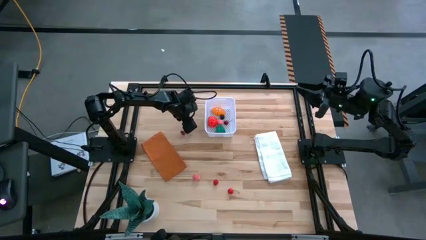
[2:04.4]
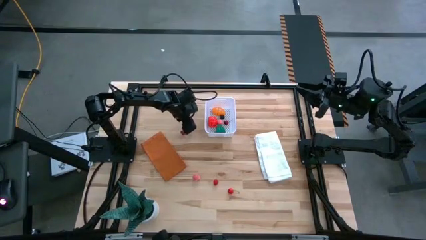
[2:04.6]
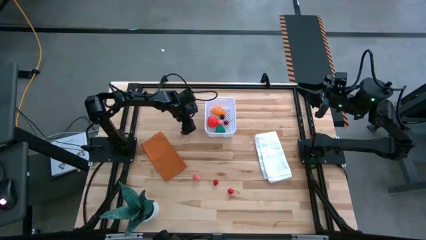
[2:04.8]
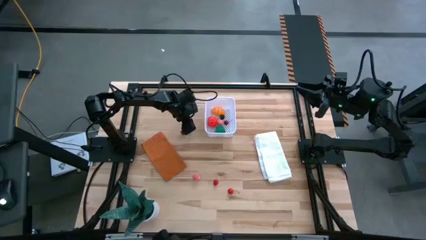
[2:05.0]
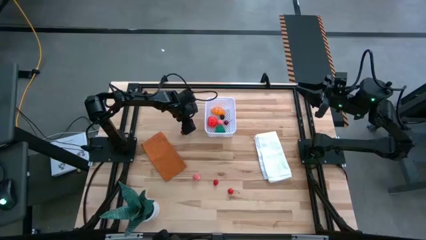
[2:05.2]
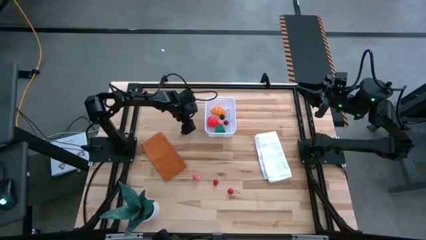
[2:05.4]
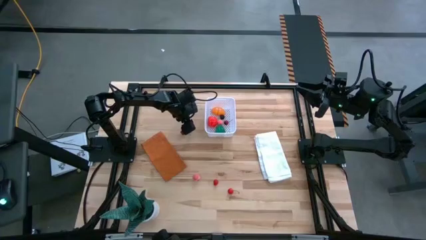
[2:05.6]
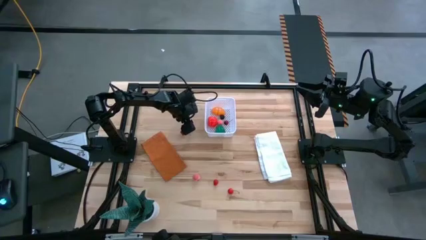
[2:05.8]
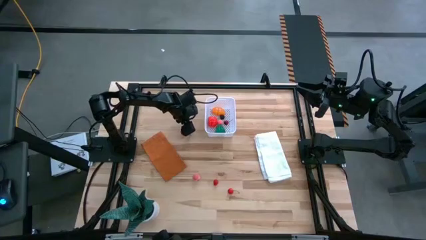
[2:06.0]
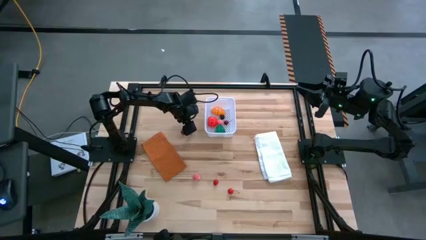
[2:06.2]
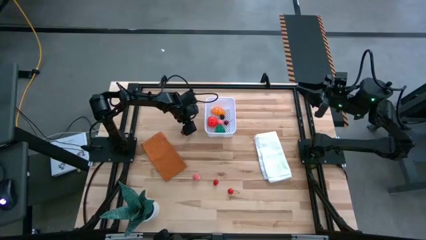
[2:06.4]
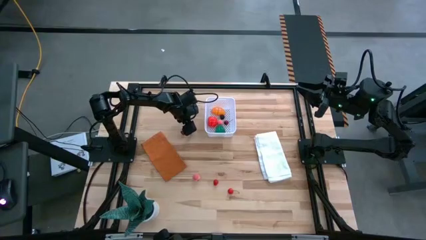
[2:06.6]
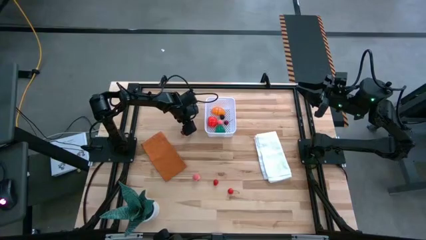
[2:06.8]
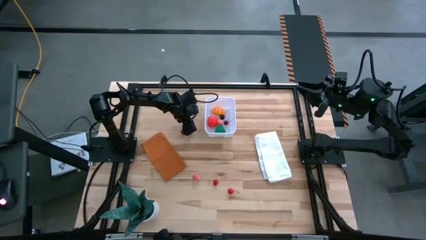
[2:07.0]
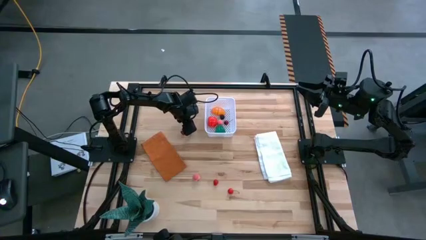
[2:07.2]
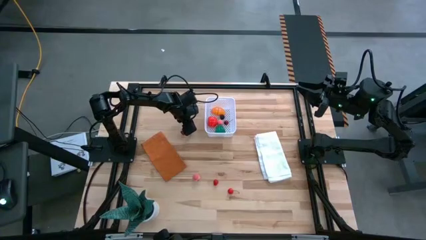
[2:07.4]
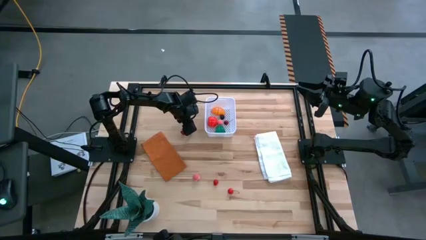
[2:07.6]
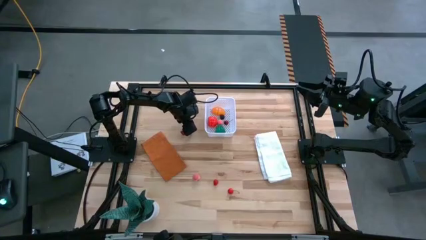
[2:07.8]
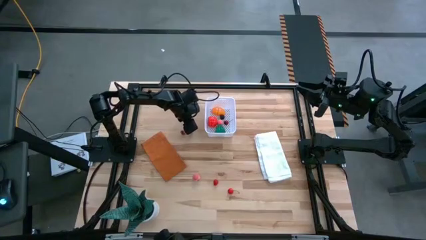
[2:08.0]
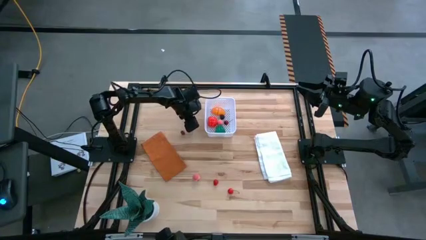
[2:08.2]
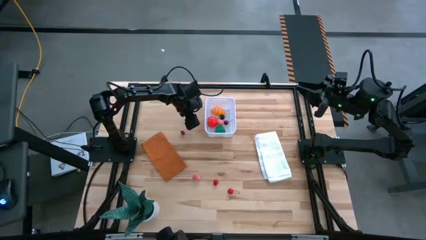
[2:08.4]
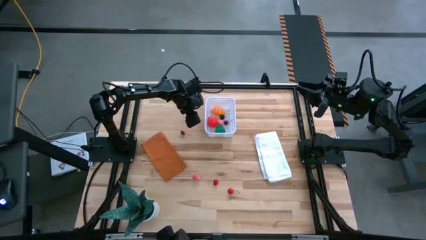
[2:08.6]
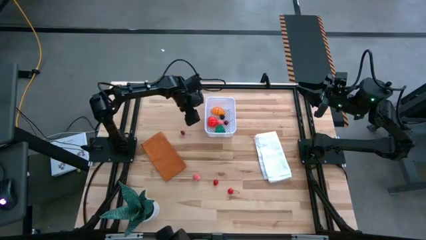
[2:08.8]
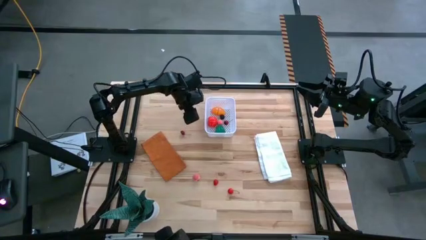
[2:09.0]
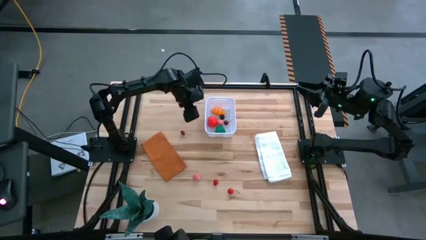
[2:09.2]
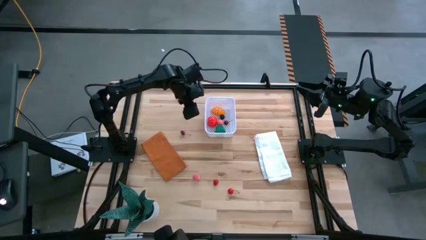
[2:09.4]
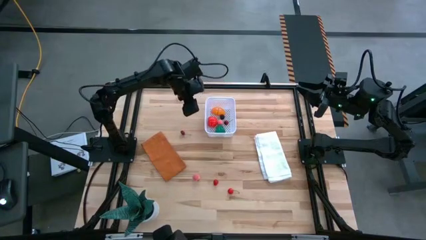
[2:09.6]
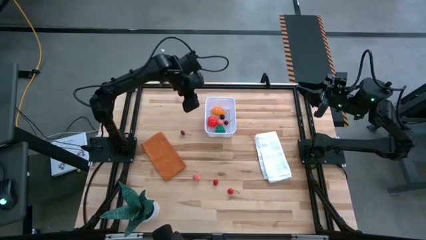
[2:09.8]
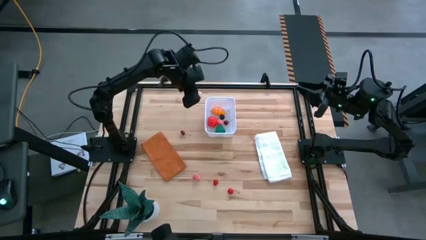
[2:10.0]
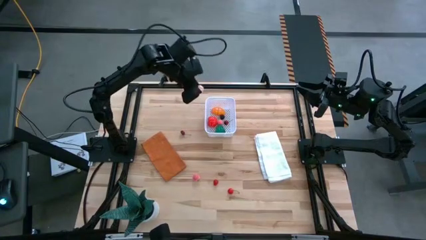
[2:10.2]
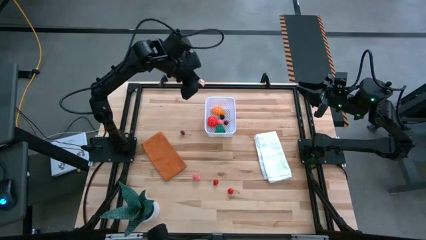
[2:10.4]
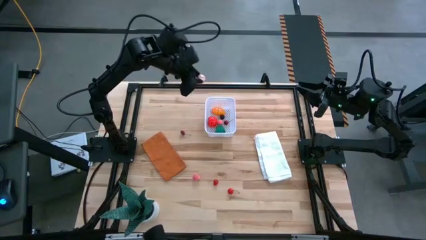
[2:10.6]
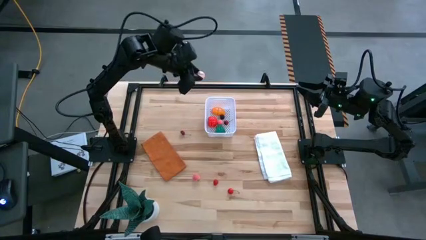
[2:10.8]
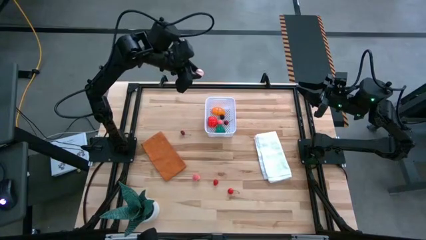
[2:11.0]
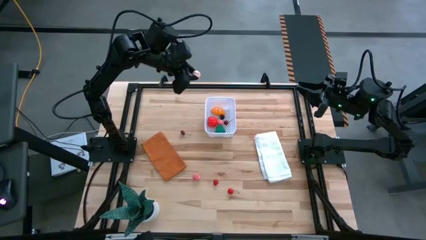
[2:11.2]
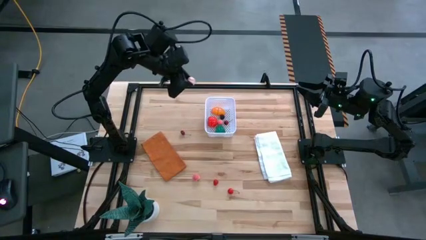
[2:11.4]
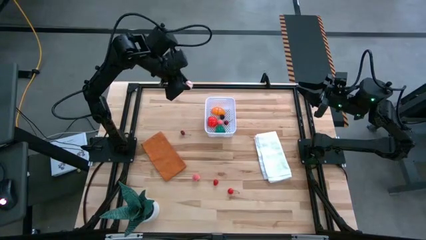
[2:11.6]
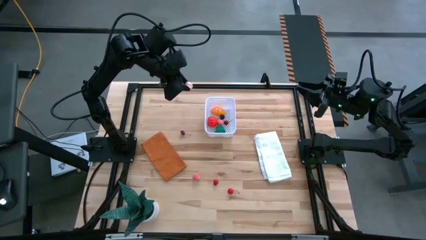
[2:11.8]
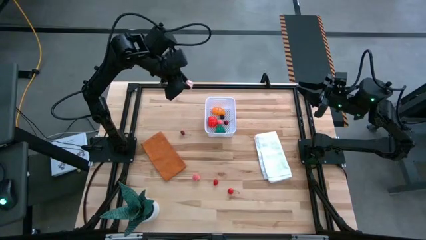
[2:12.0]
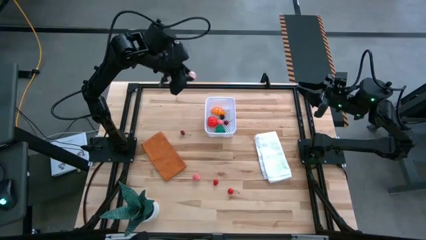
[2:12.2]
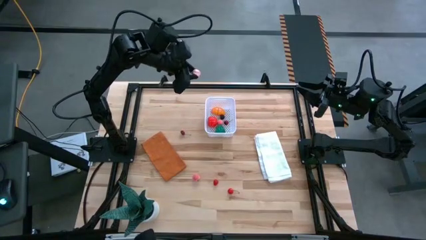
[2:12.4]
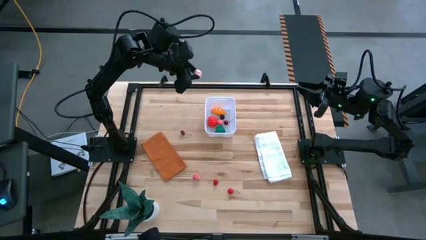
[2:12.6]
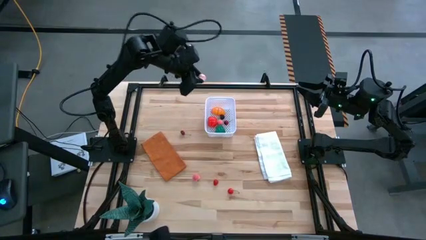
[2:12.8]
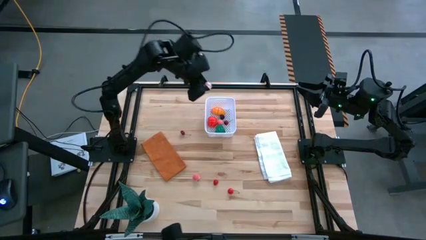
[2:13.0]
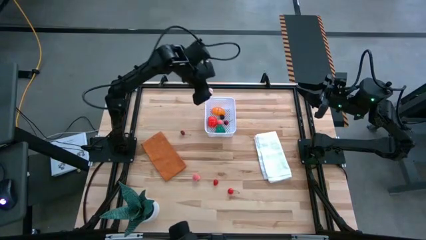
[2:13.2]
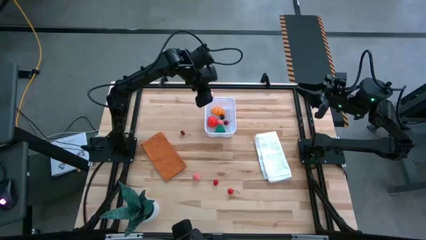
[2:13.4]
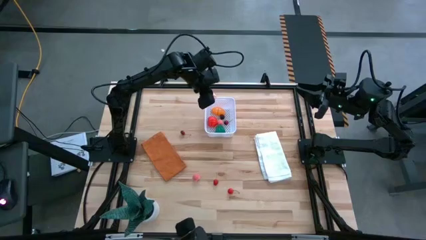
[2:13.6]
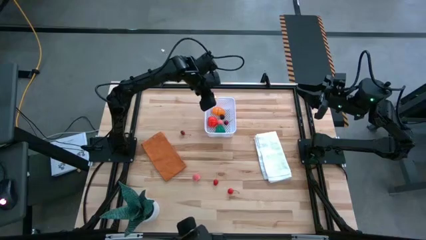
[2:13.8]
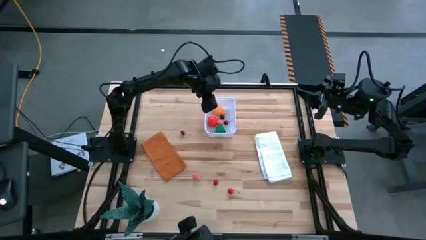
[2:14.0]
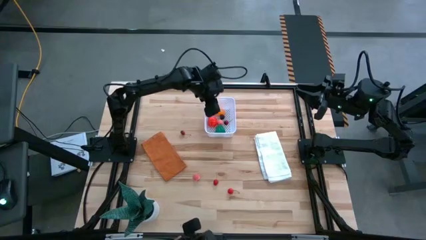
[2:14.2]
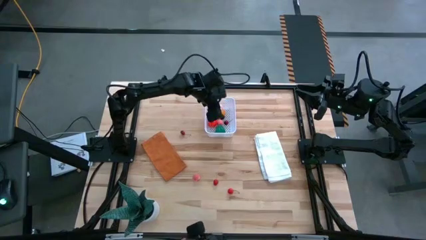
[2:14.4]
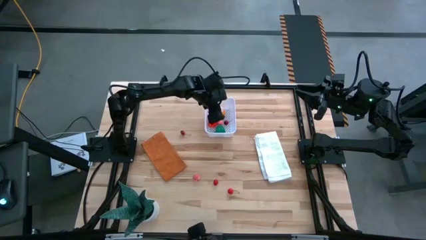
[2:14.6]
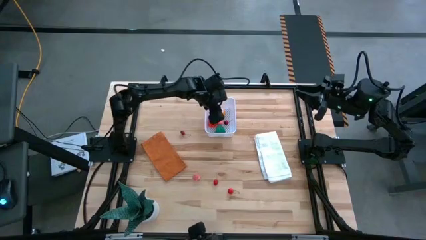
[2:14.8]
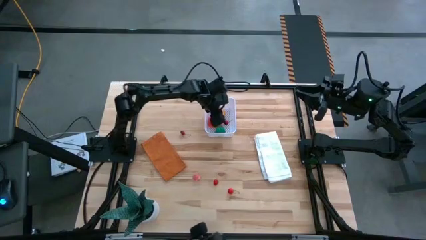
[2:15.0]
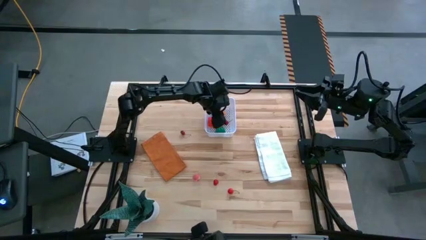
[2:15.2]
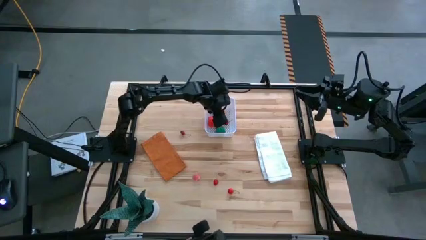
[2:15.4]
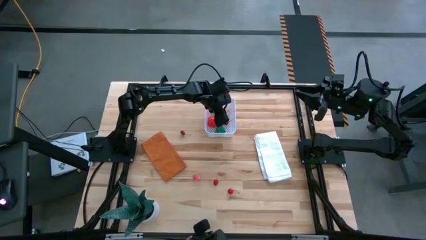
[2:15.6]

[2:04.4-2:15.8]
Task: Pick and placing Produce into tupperware
Put the peach into the white bin

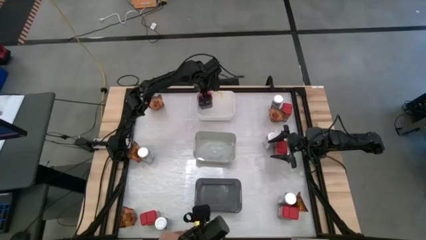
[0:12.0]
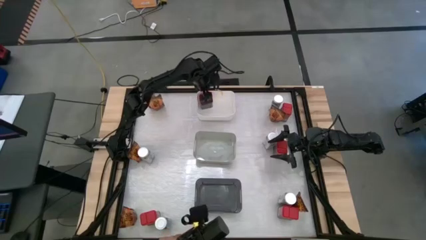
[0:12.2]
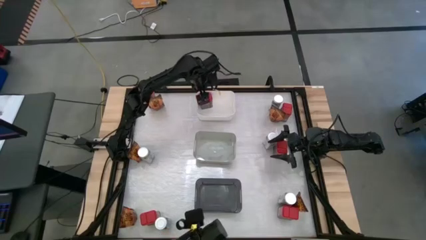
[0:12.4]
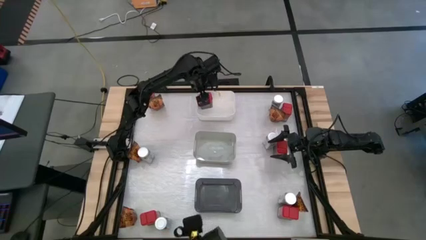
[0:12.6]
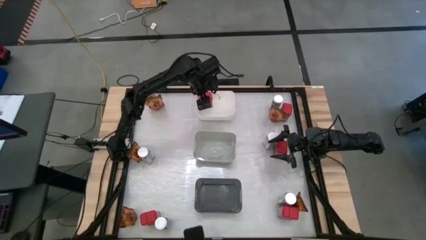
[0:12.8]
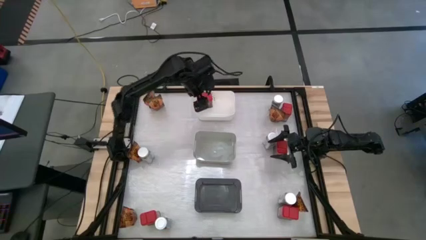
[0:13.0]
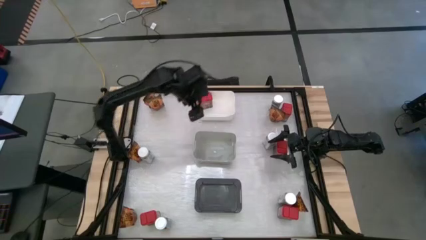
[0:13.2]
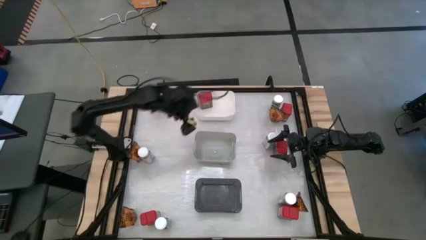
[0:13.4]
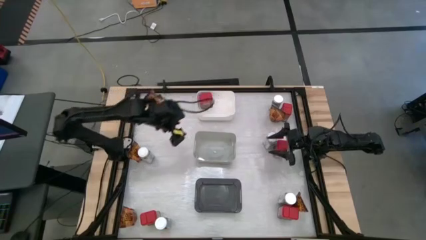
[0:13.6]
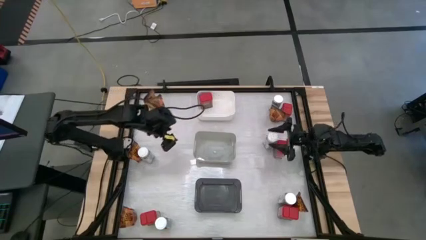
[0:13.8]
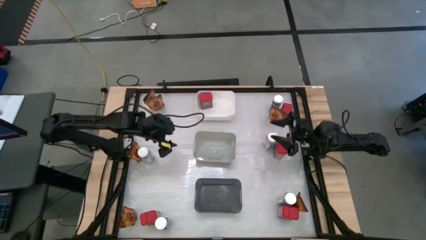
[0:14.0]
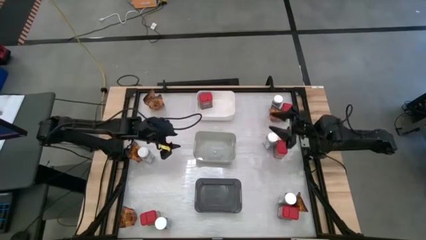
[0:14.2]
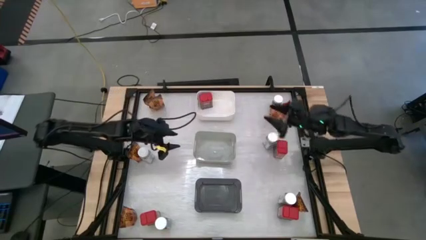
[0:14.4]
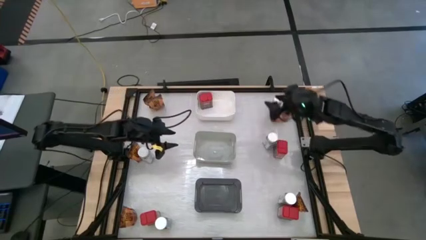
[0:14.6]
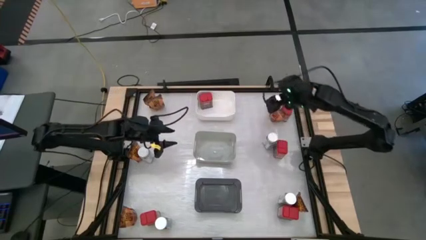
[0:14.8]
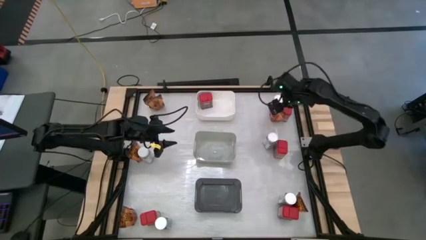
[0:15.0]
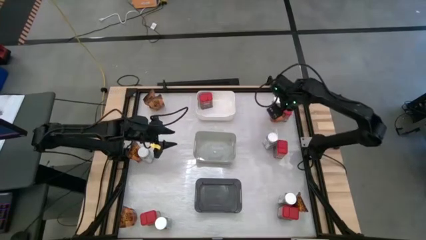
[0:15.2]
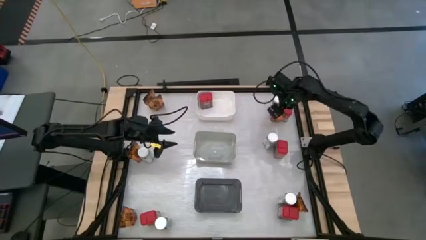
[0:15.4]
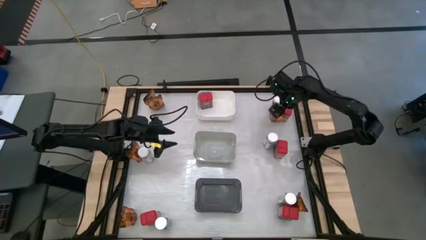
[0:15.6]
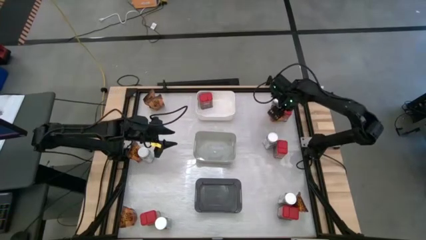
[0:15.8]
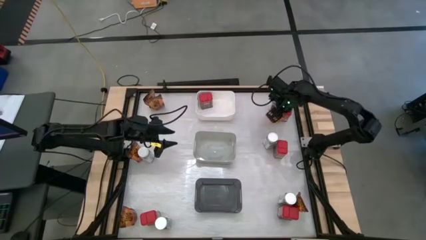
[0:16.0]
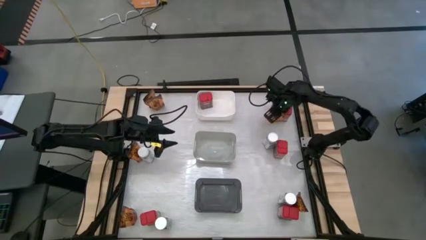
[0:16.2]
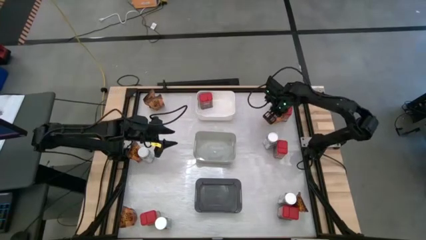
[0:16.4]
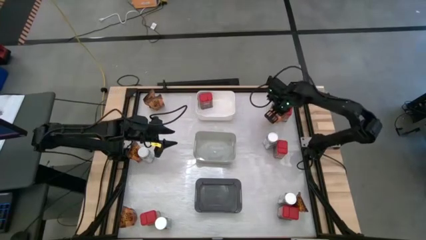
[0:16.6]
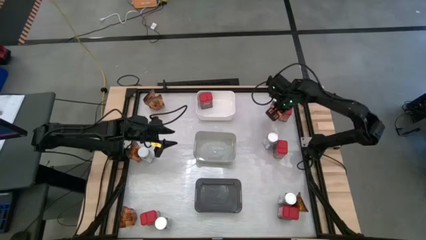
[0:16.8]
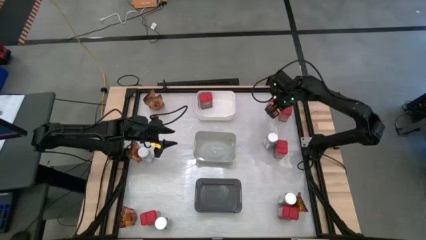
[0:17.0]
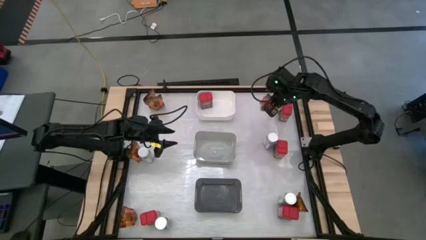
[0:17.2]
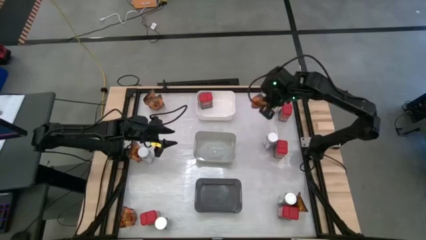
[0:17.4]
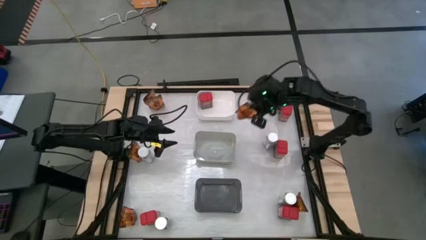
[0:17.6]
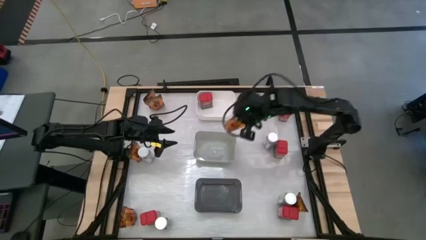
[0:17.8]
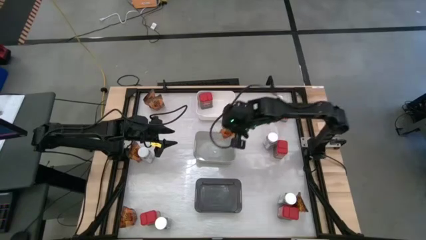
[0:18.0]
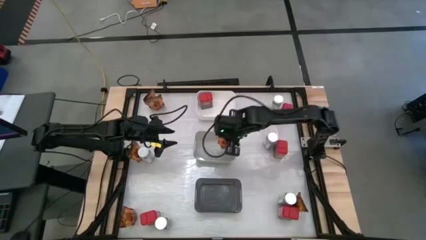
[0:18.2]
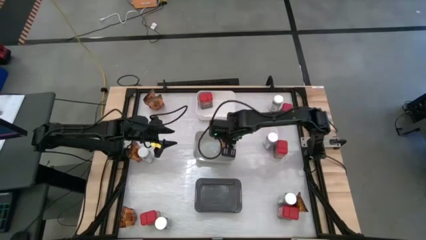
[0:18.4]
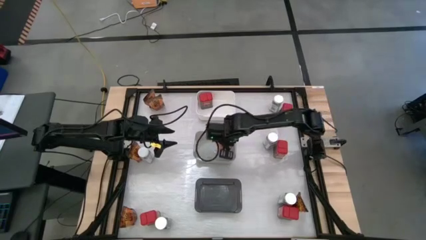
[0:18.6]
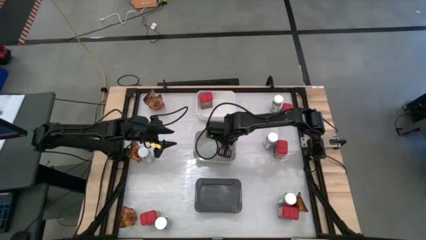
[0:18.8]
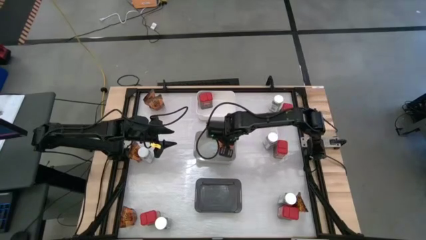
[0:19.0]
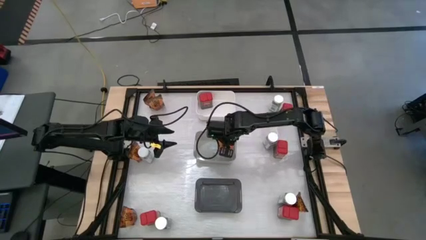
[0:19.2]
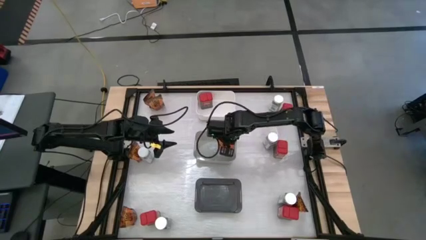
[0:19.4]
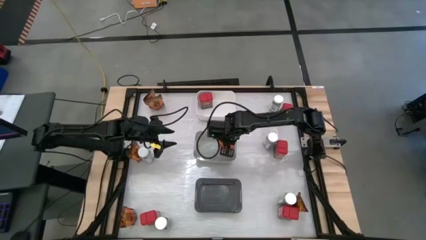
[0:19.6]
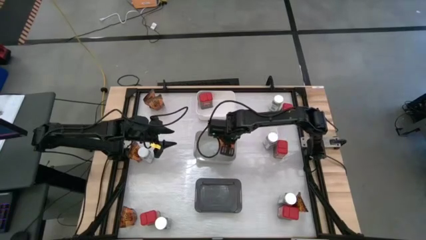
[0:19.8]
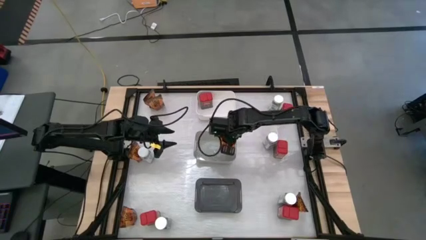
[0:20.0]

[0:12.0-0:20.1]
Task: Sort spices by type
Put the orange seasoning bag into the gray bin
